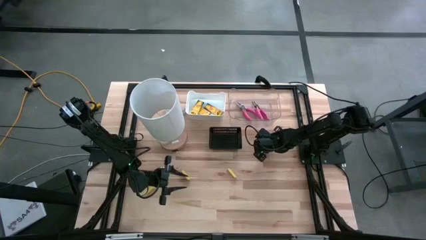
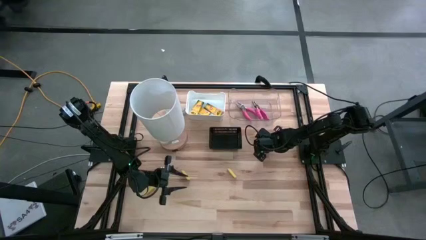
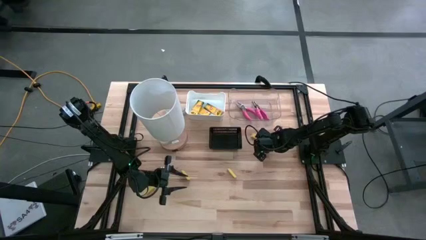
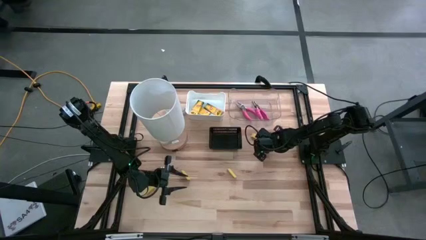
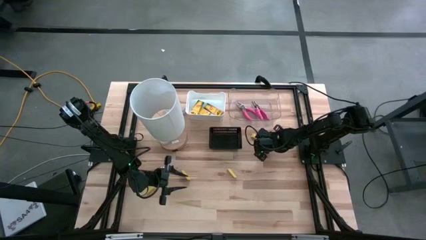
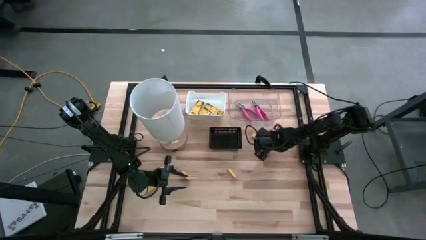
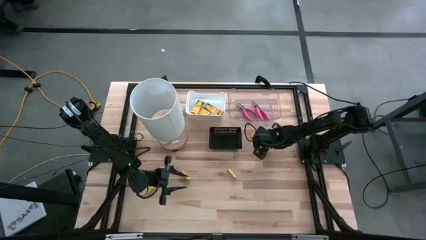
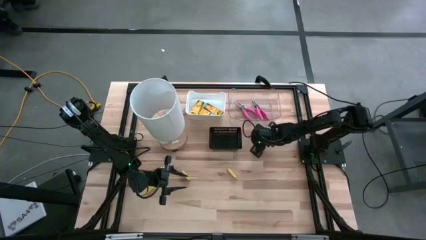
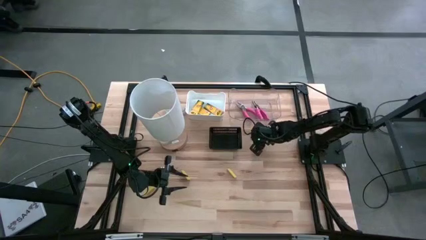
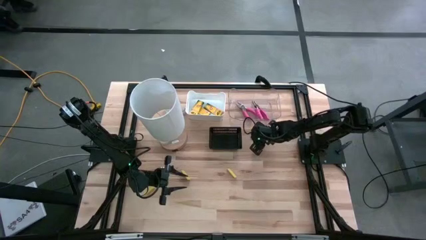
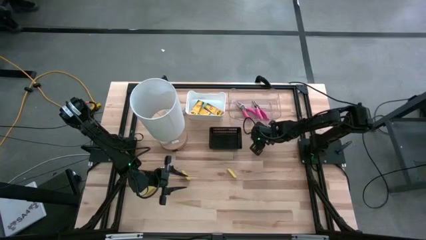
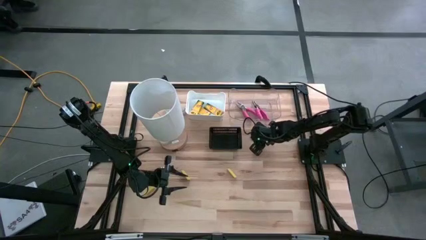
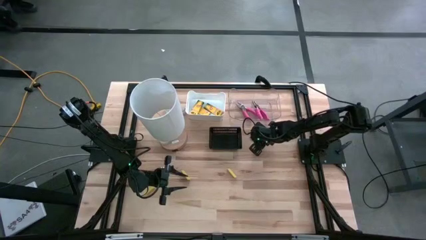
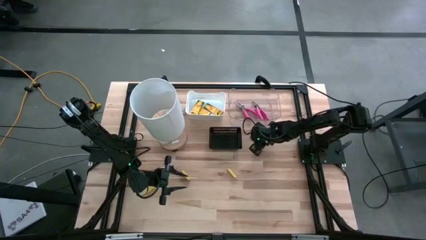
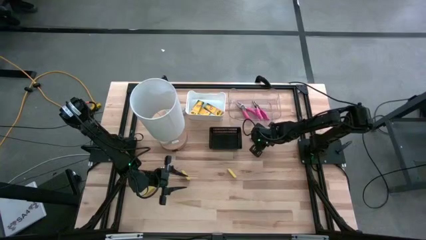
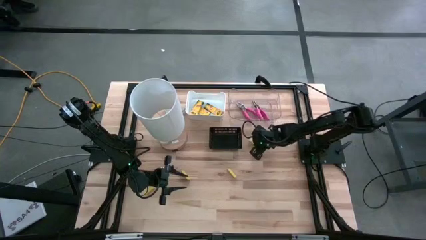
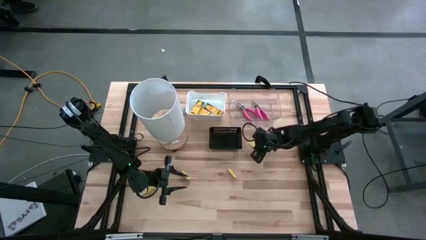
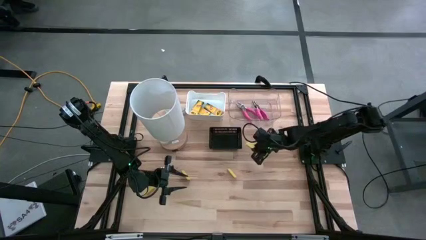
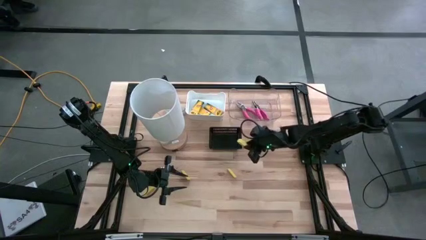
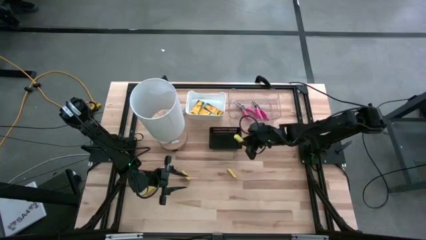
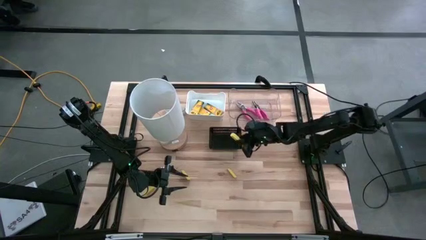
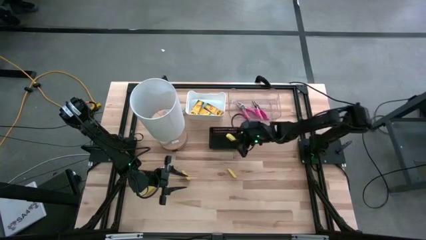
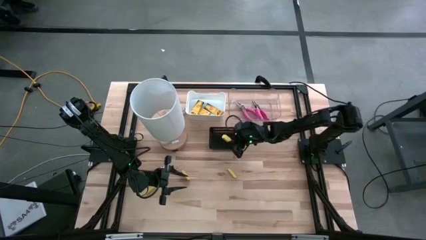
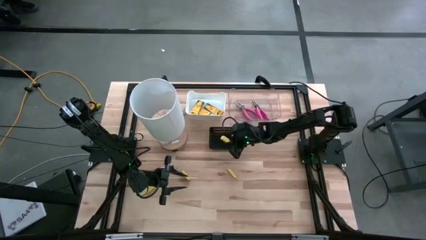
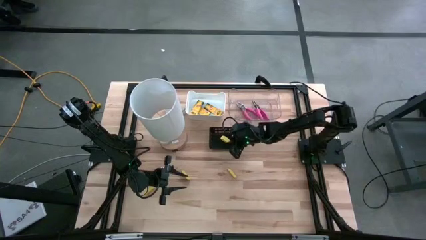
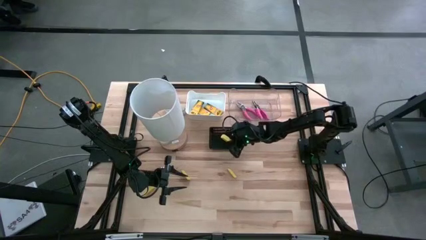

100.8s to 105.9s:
Task: Pick & Place School Supplies
Put the yellow eraser into the black bin

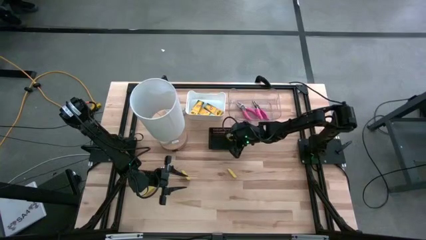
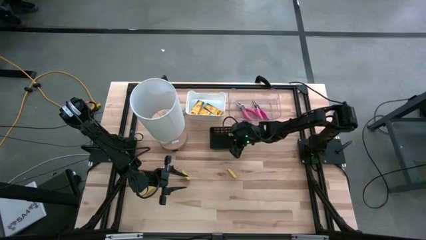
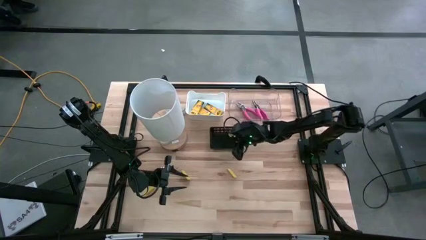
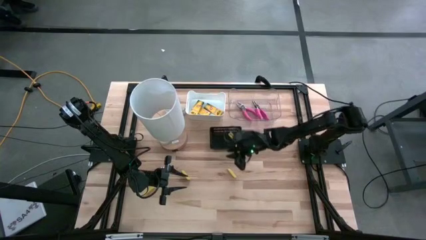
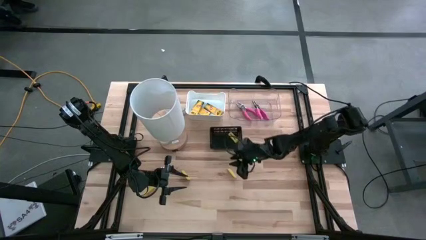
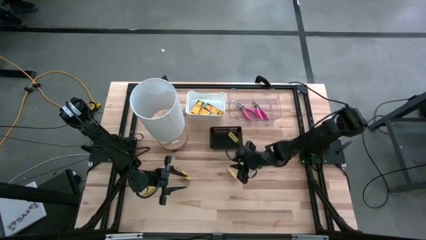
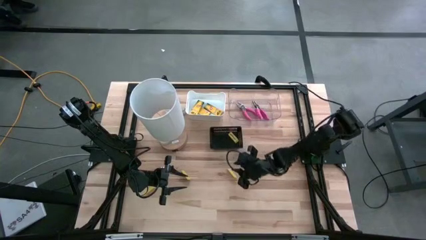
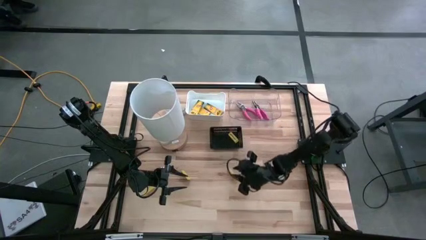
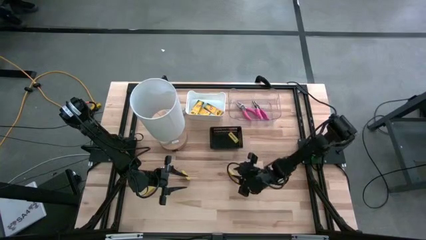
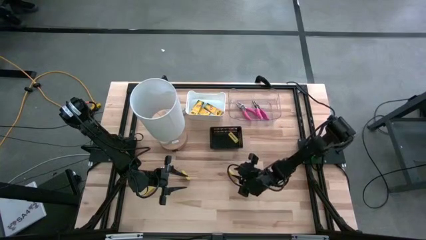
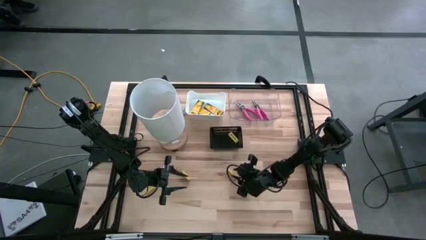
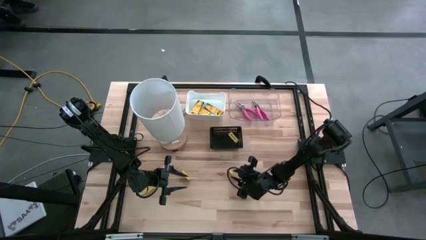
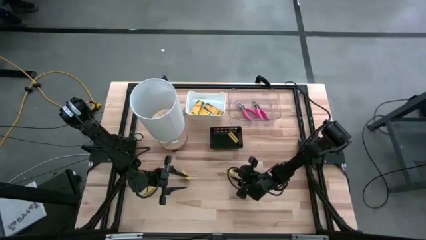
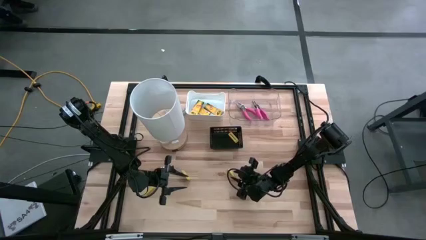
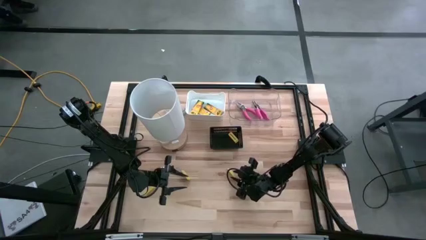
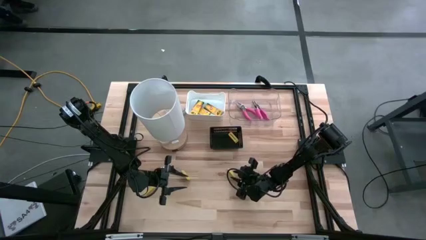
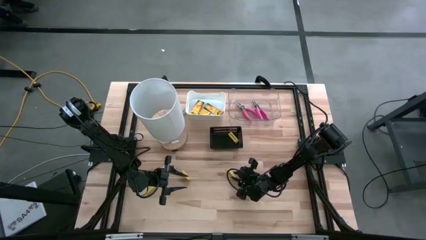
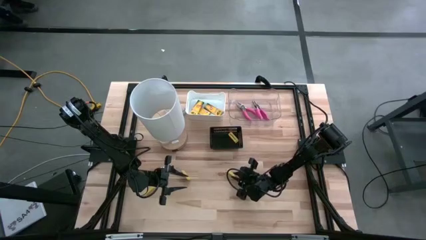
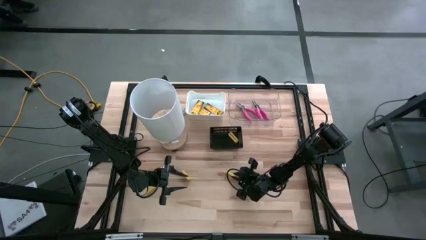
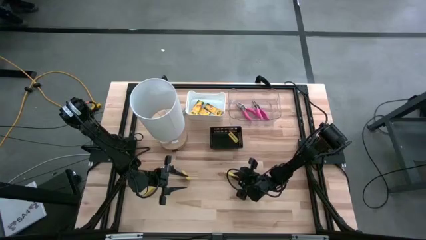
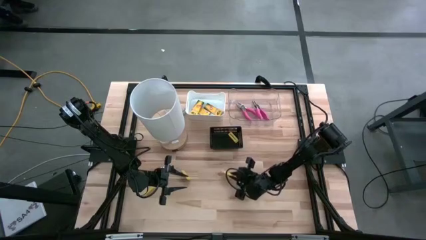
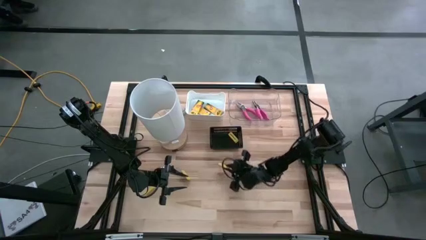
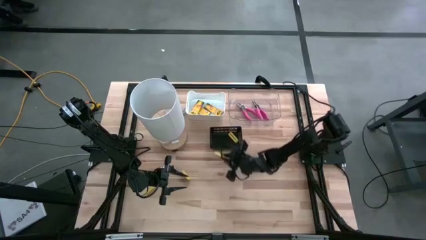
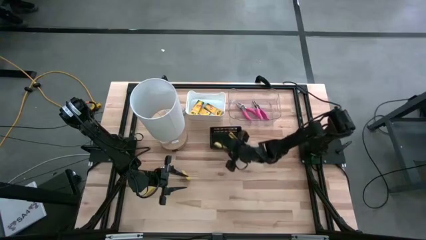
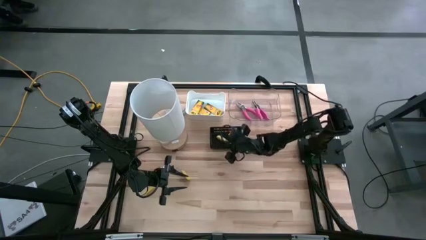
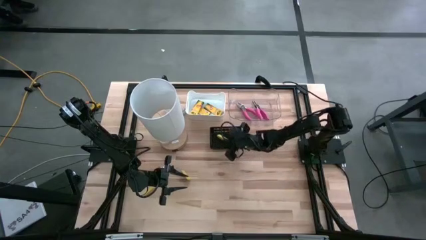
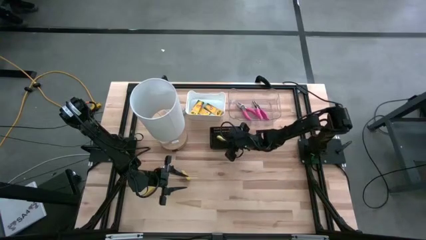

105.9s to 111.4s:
Put the yellow eraser into the black bin

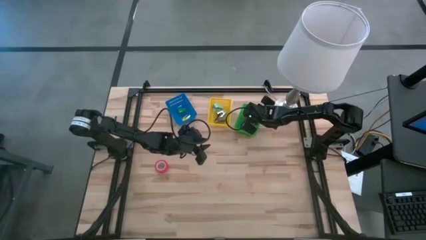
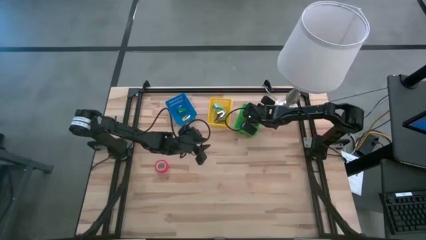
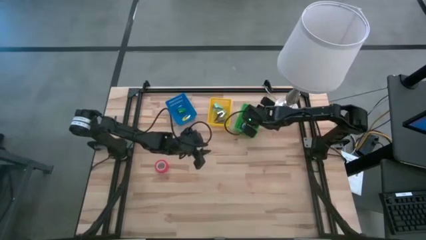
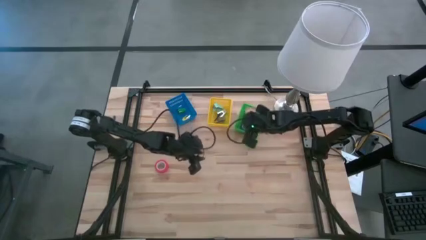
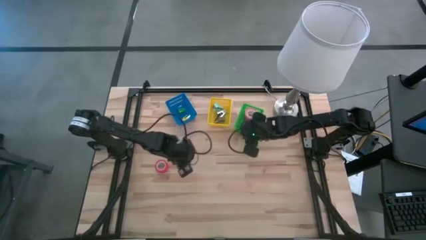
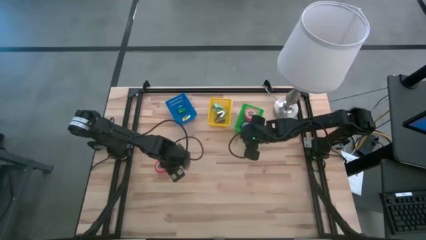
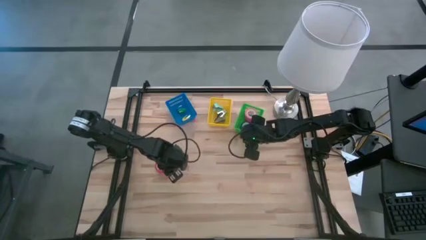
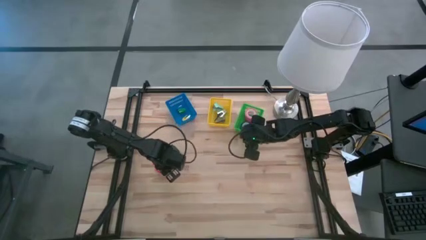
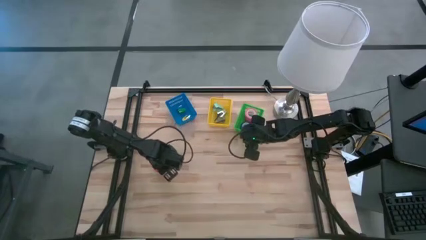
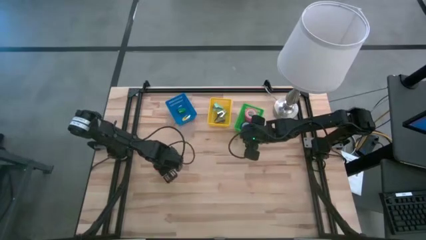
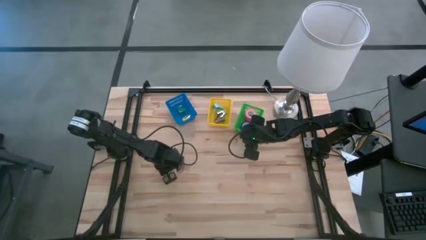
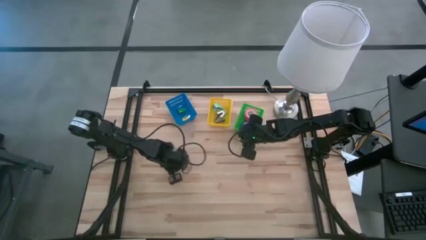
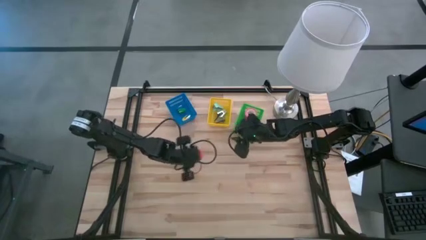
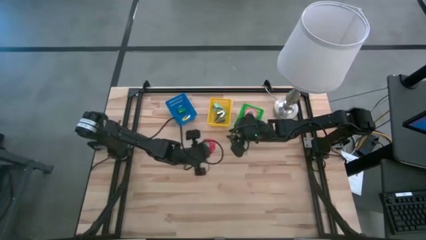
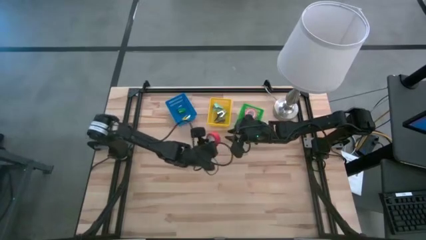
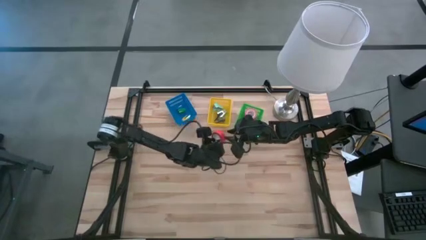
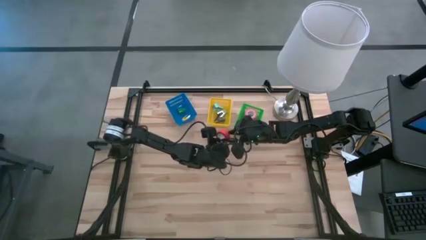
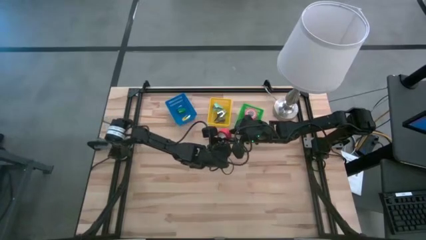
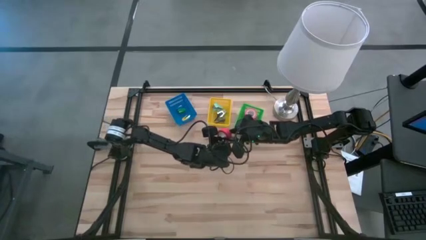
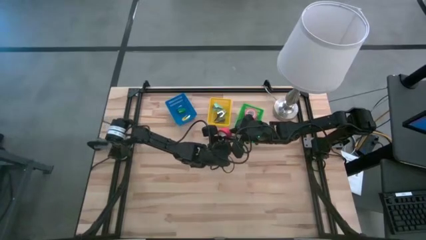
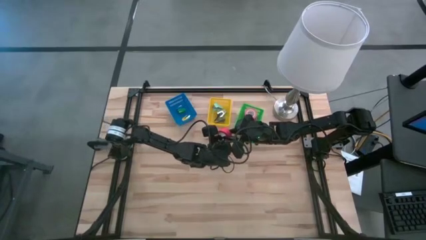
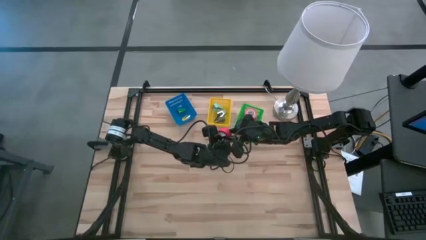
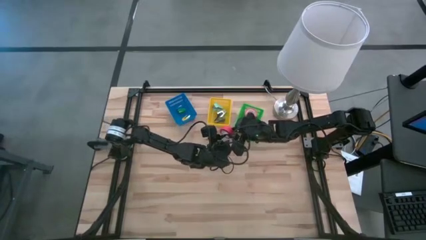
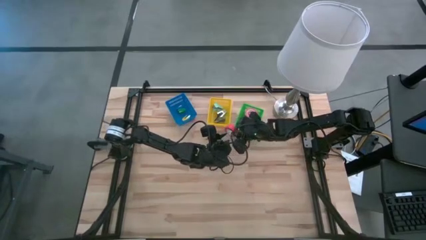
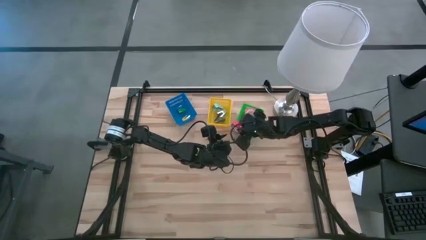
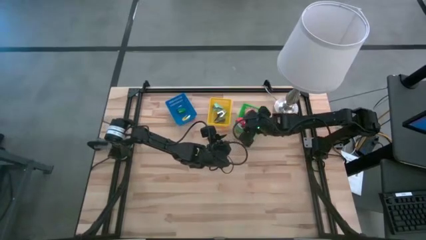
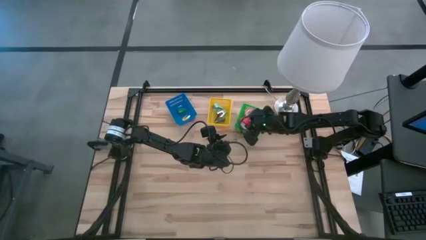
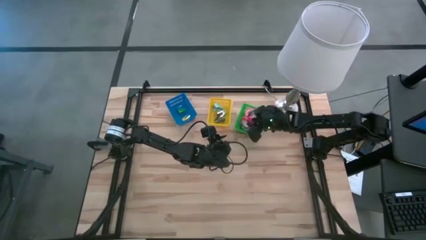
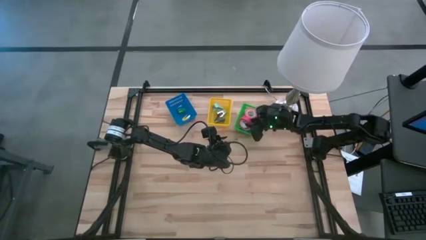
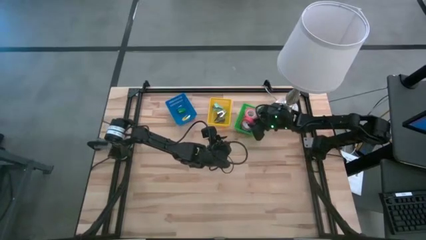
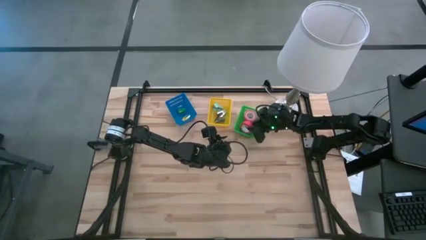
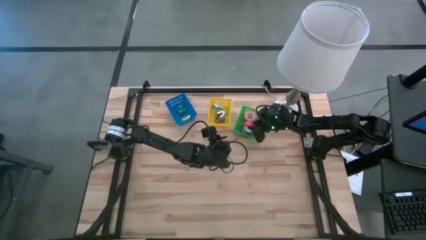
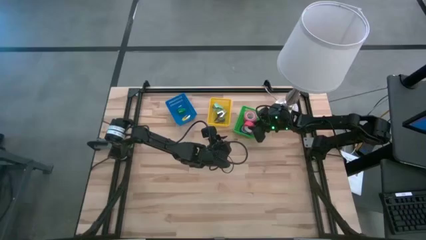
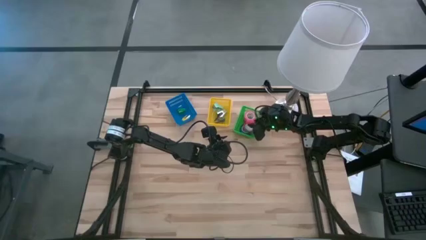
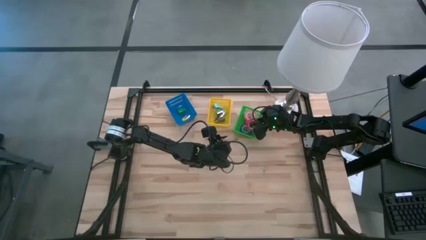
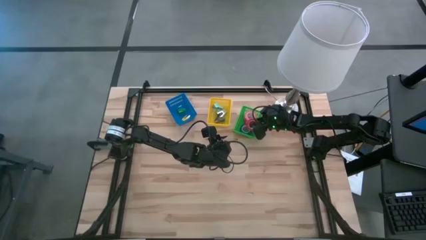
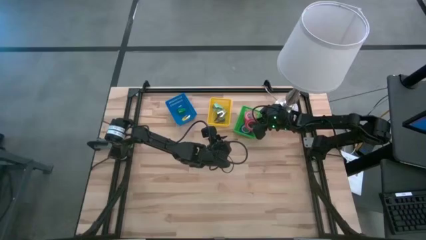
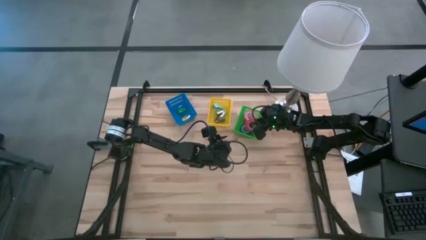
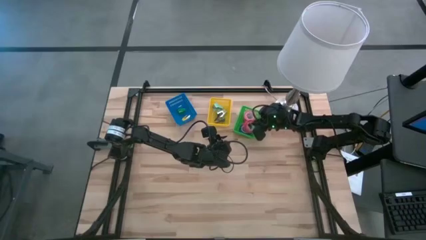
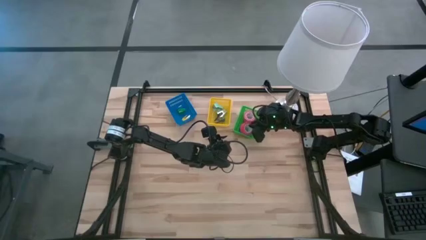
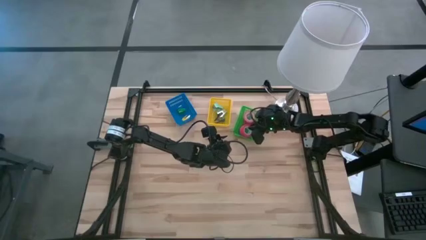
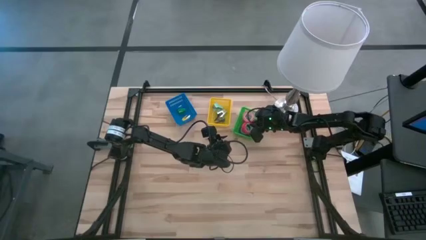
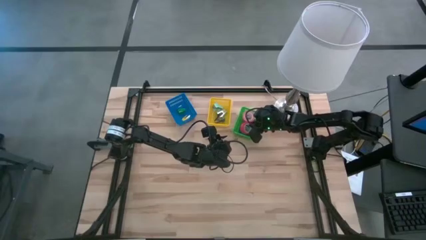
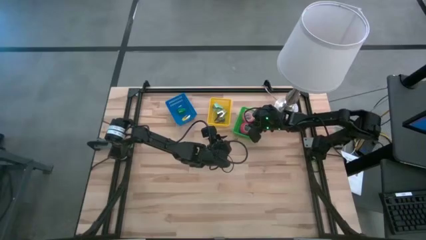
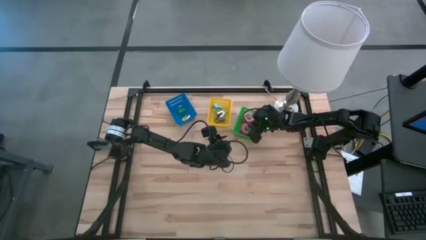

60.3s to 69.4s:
Task: Pick and place Stapler, Stapler remover, tape
Put the red tape into the green bin
